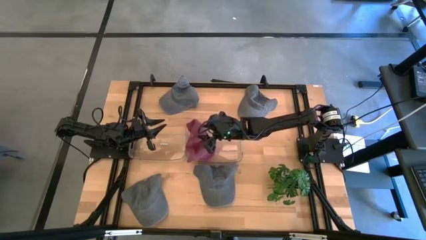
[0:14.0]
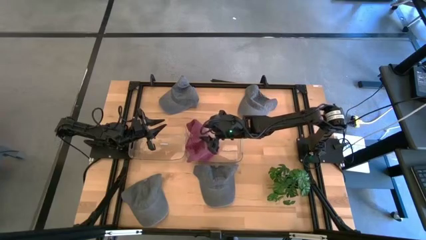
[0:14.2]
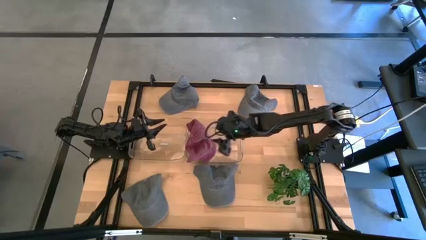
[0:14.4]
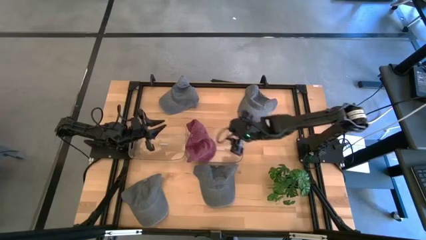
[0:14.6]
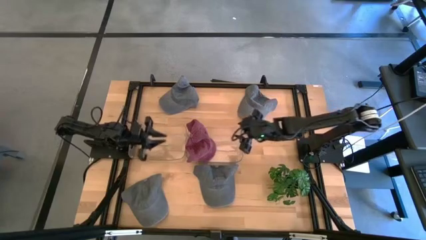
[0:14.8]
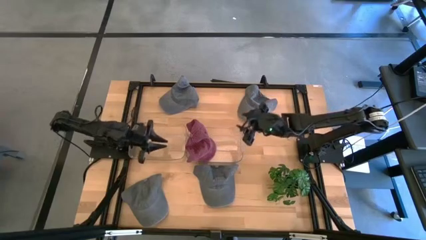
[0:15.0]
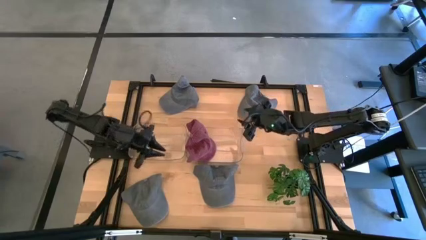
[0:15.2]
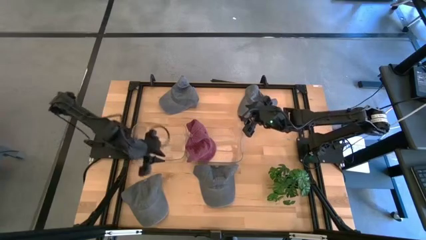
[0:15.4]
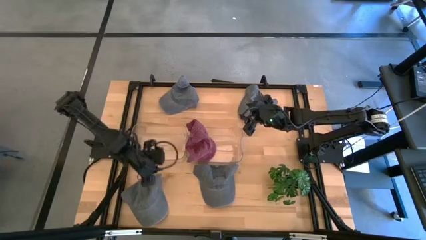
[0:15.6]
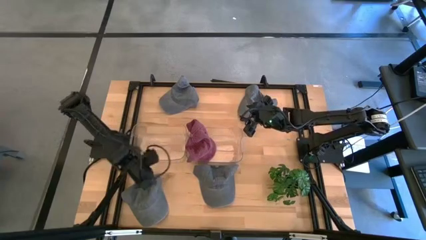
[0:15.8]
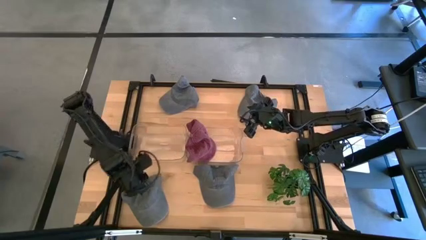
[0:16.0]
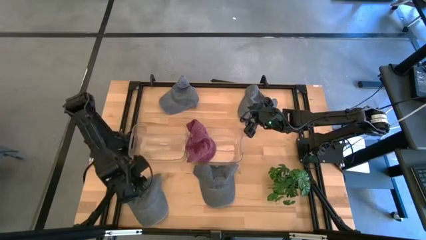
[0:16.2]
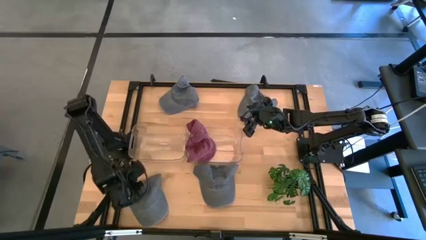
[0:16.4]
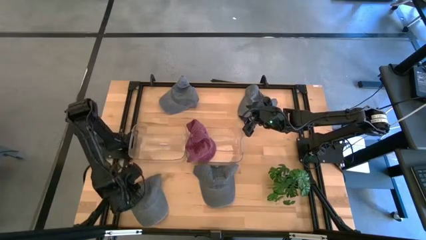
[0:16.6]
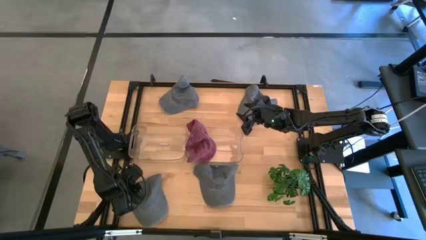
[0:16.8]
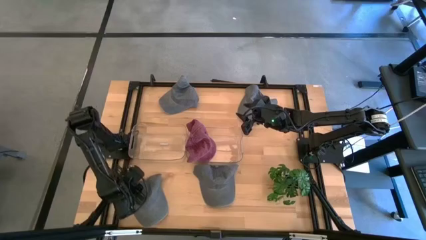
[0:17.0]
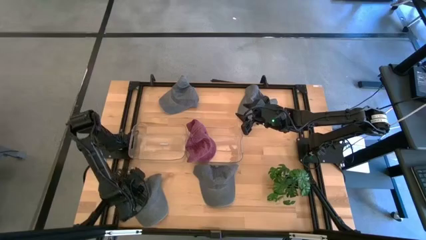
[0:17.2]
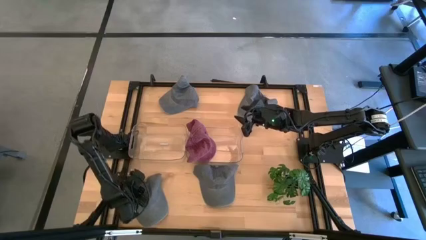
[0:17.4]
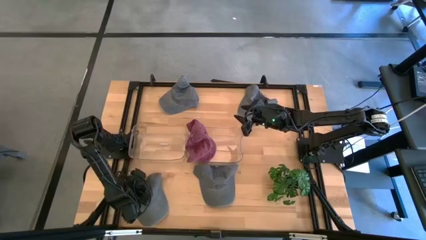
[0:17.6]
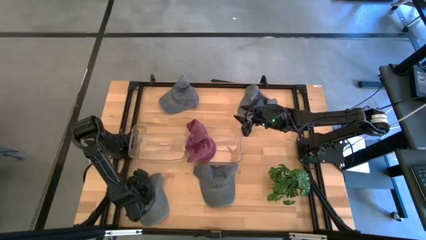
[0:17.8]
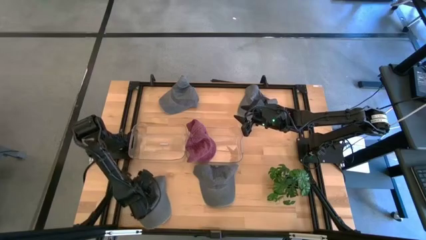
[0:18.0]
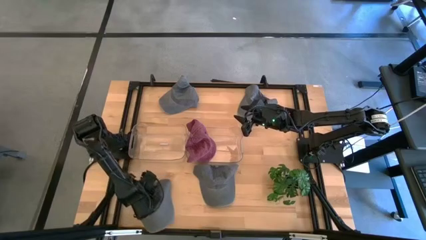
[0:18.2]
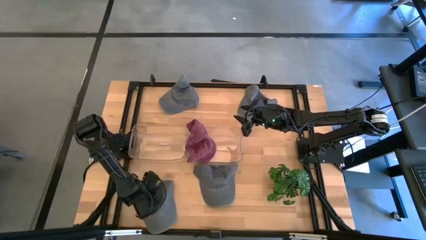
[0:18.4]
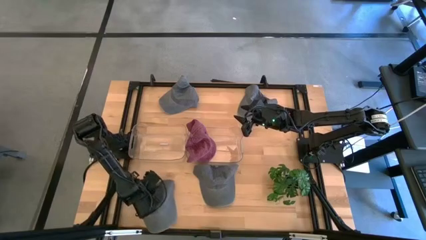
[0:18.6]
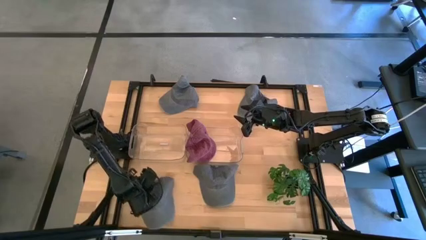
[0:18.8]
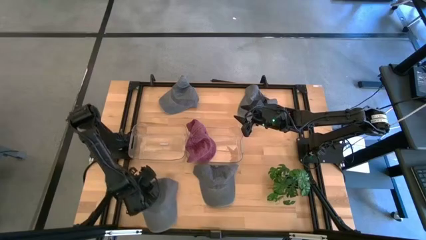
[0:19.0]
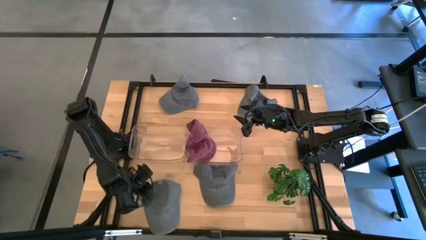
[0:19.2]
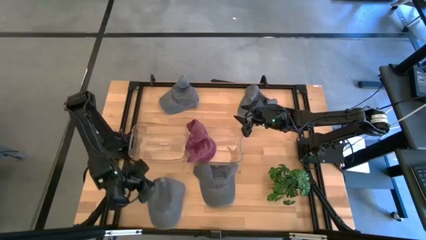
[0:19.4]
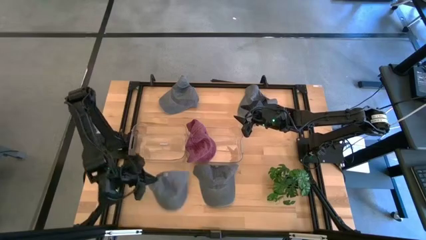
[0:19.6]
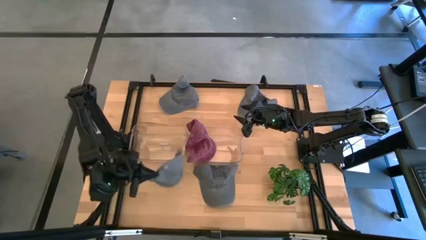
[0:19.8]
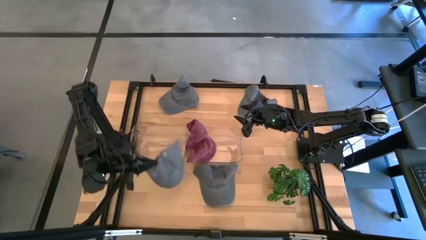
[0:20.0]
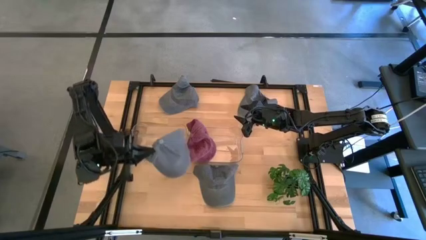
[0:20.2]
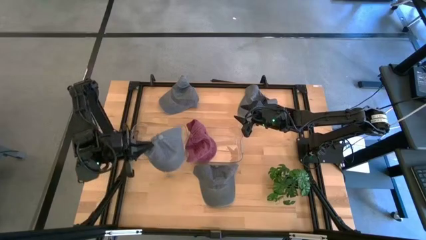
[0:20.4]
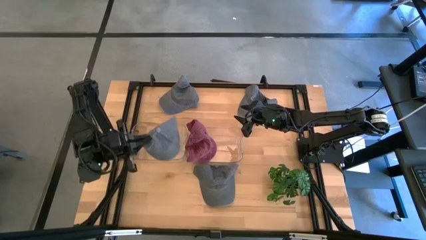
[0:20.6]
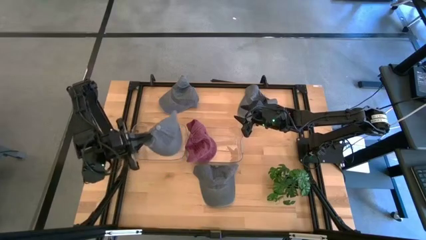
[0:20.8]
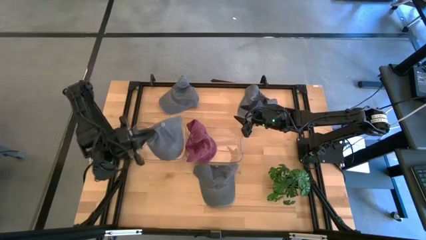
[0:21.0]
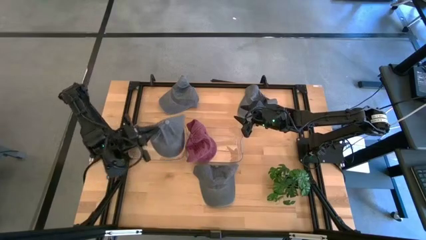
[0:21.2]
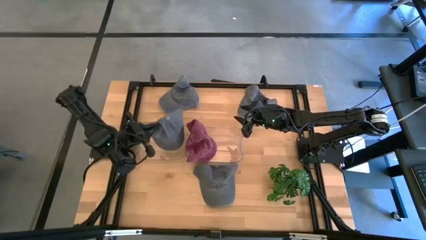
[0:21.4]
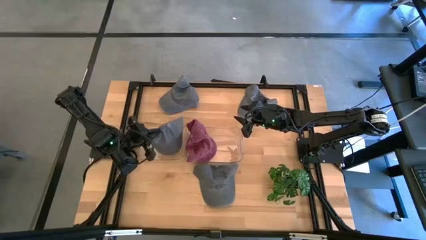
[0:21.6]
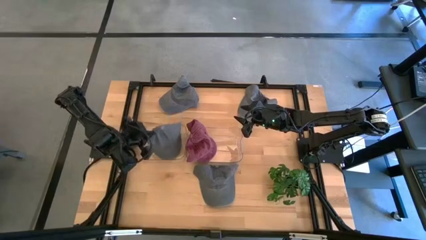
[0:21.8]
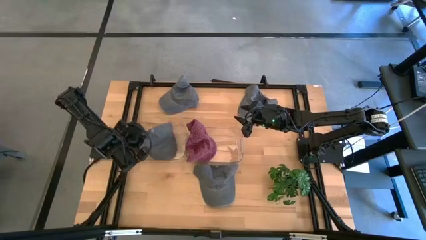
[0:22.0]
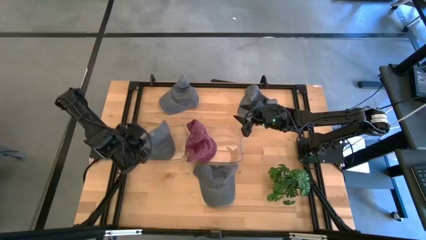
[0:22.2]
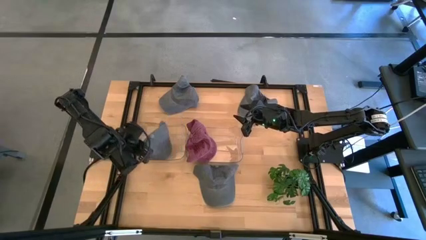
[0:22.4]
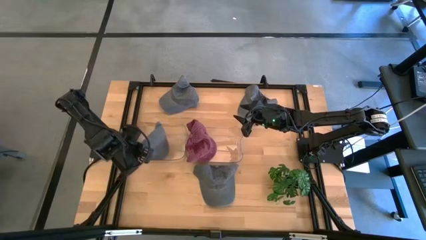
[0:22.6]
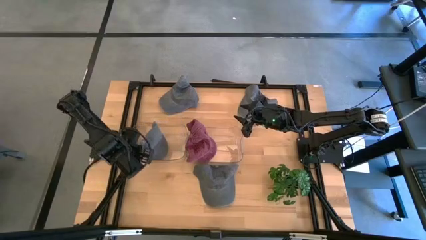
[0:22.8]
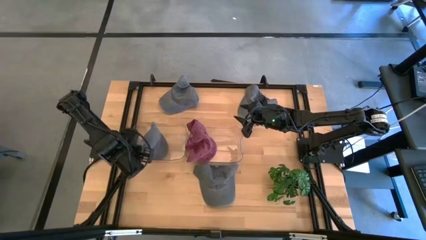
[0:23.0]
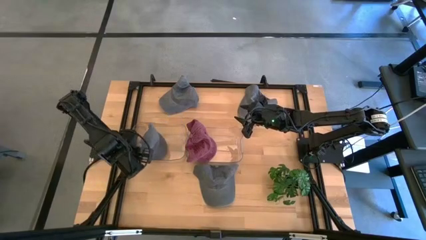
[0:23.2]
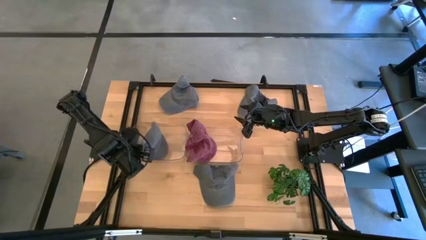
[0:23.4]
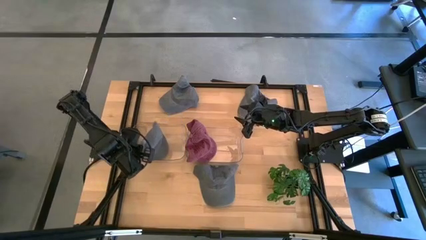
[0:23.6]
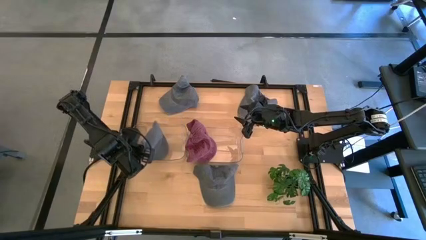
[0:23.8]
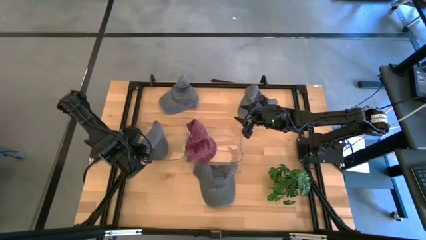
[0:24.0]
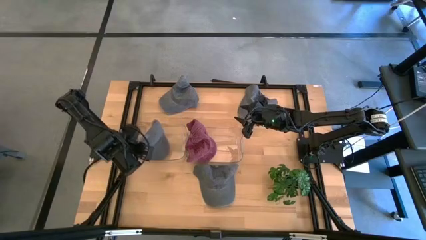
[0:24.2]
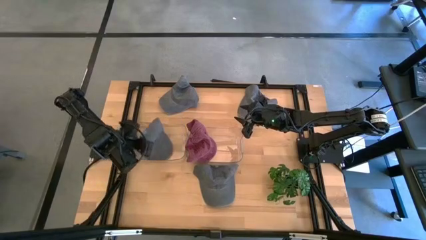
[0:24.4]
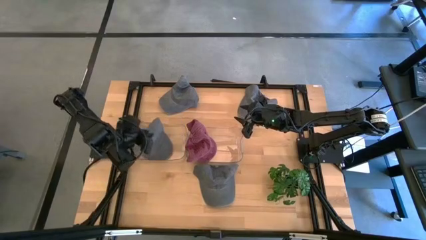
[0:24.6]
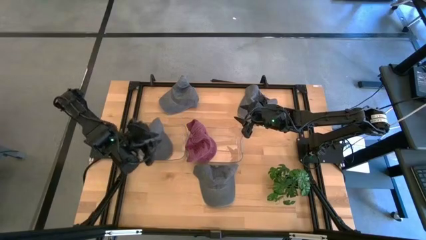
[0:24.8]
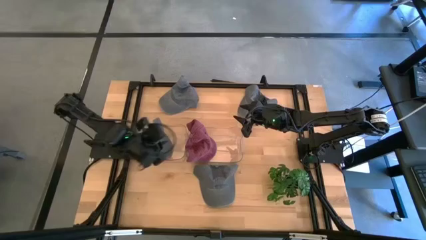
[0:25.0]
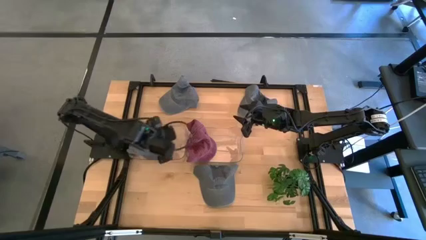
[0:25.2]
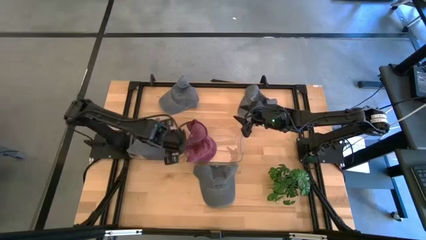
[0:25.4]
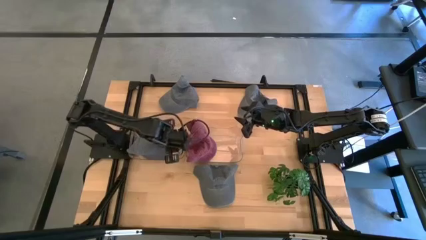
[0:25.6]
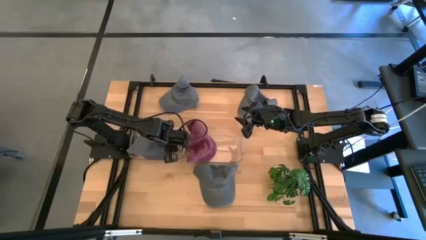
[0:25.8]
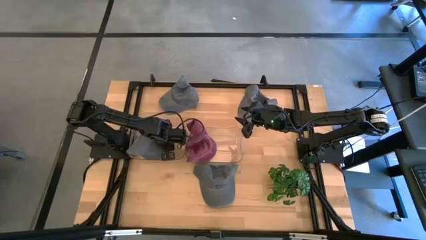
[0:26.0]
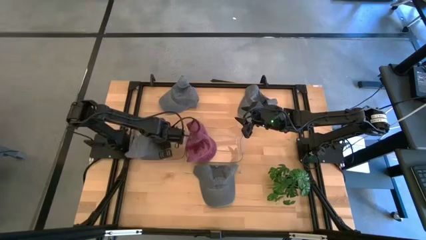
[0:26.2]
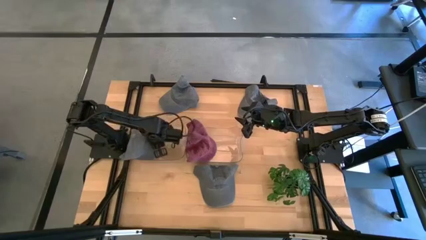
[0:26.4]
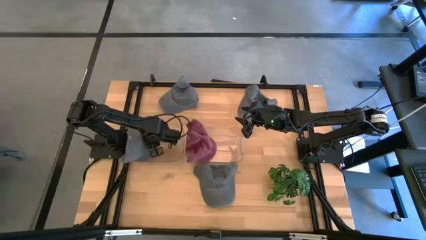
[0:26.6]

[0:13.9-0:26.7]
Task: Pick & Place hat
Put the bottom left dark blue cap into the left transparent bin
